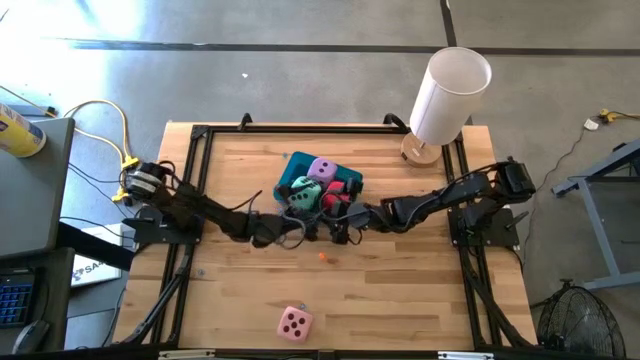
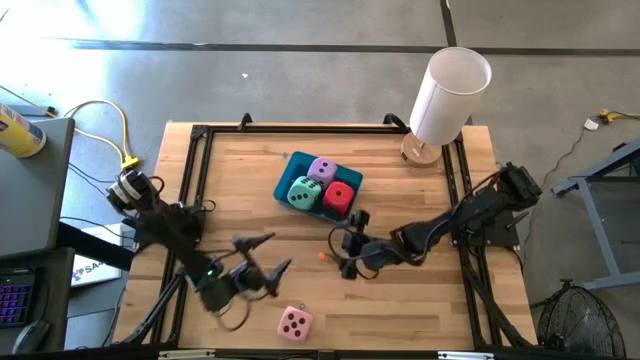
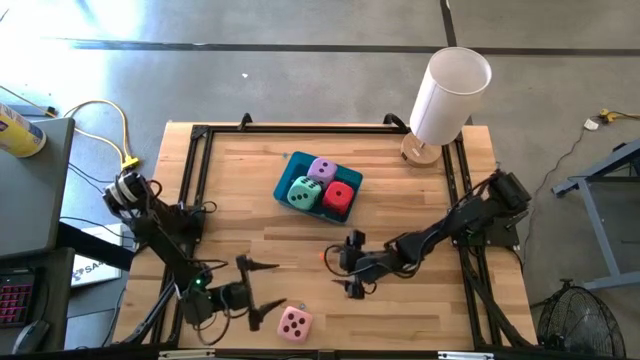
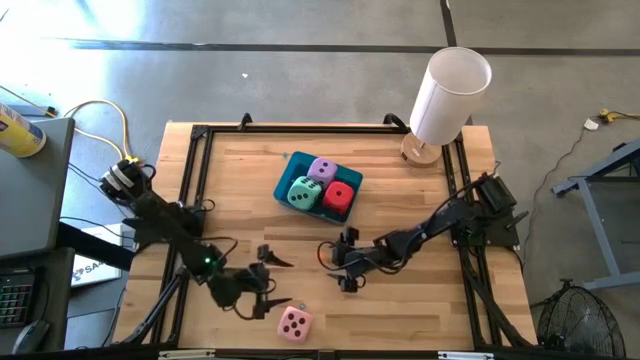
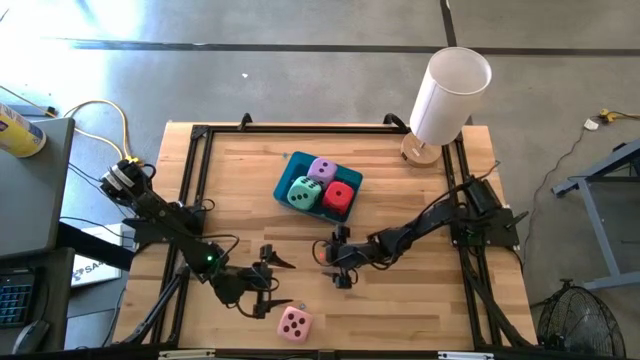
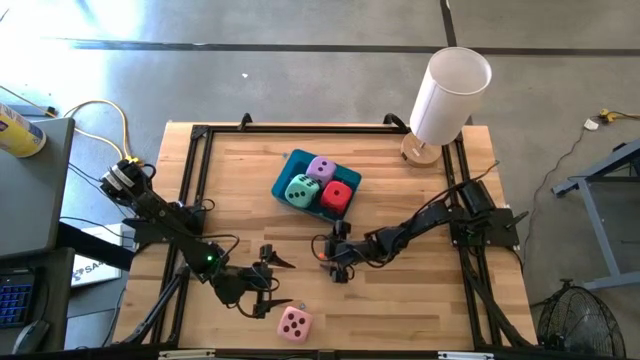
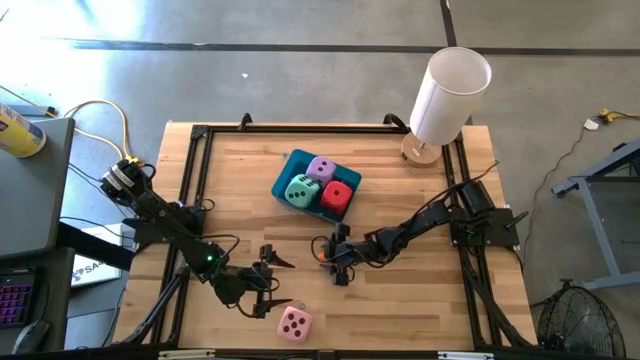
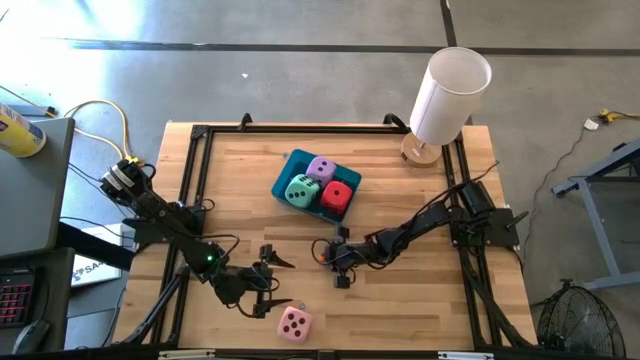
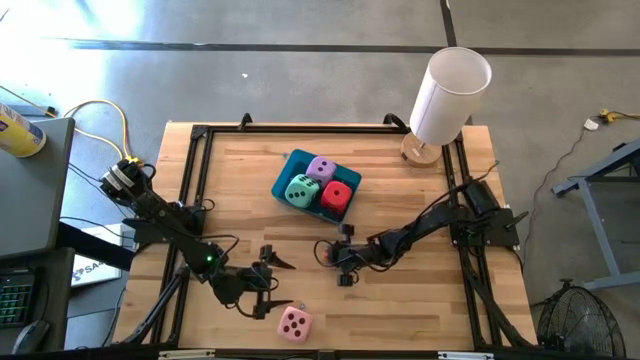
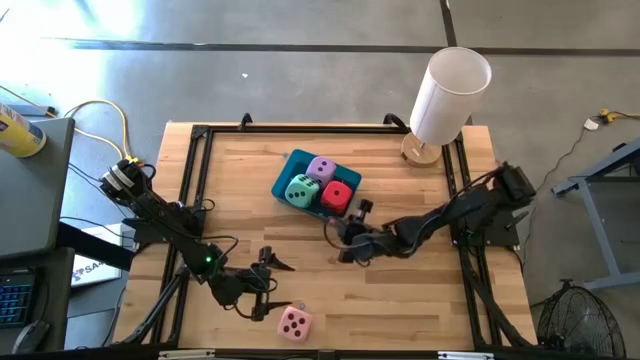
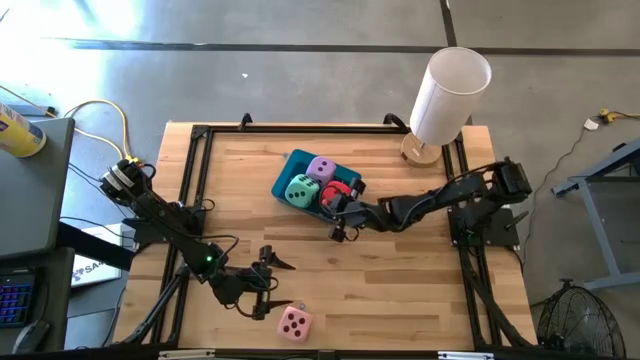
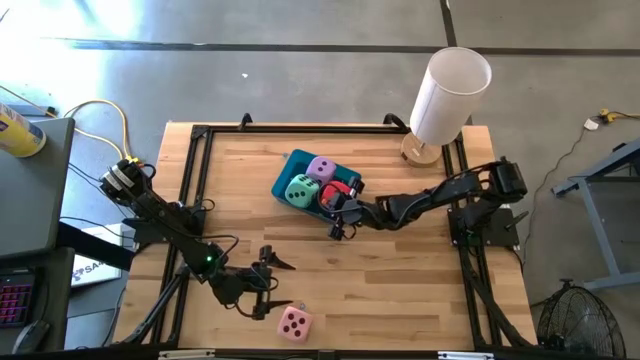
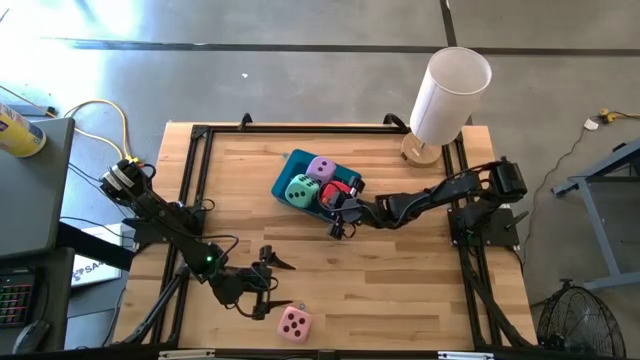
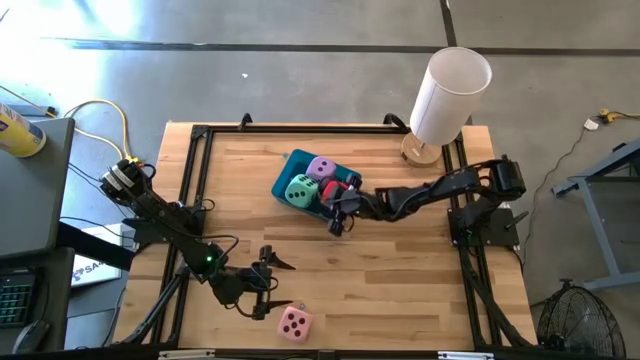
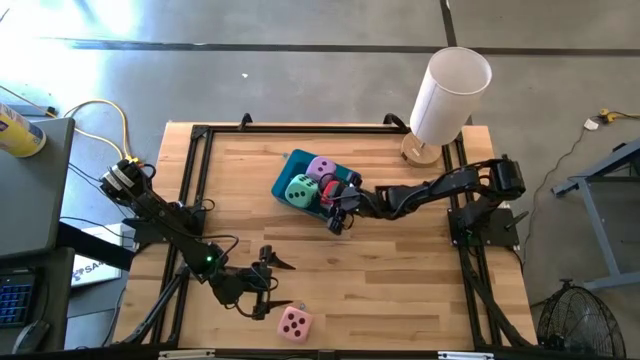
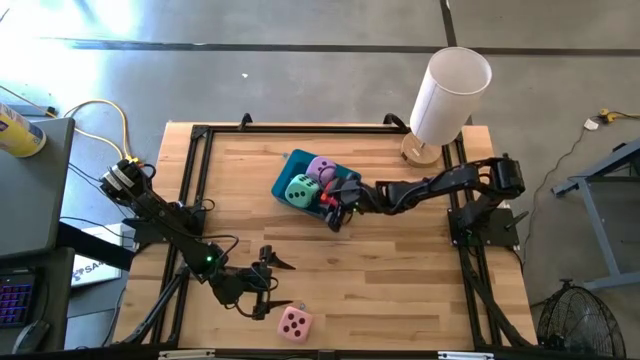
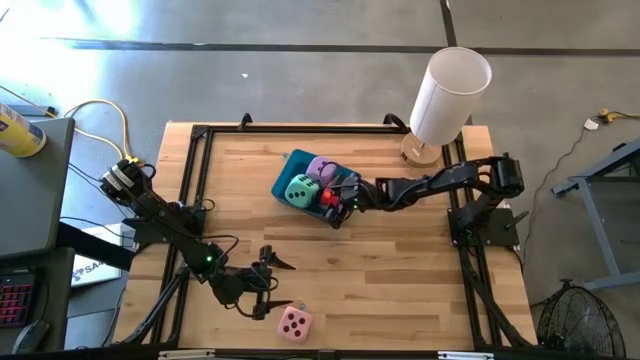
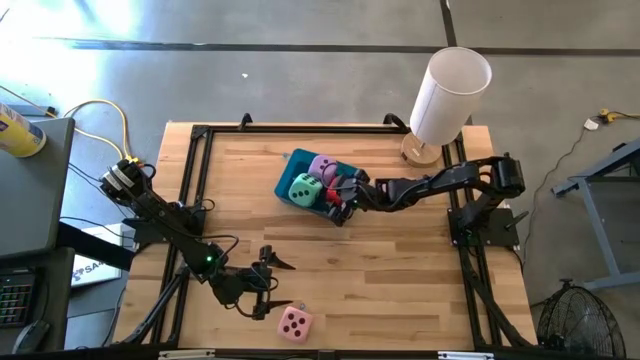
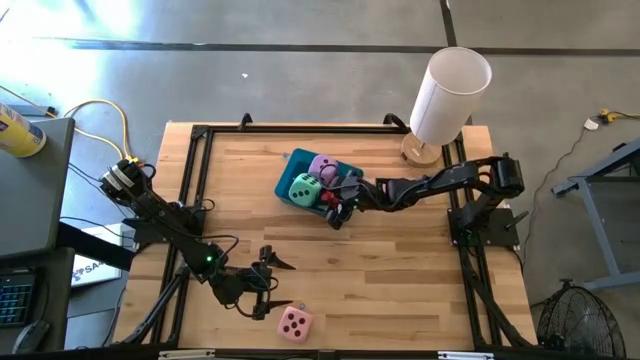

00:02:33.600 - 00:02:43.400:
Task: Pick & Place Dice
Put the small orange dice into the blue bin

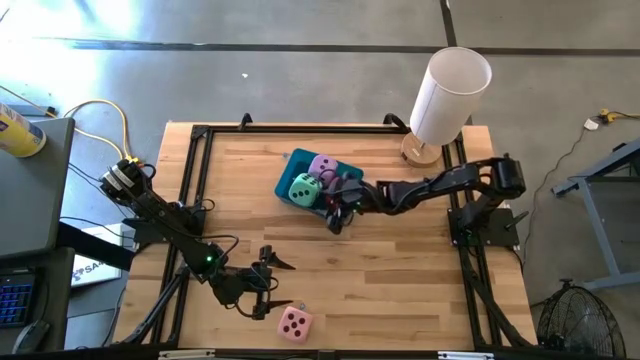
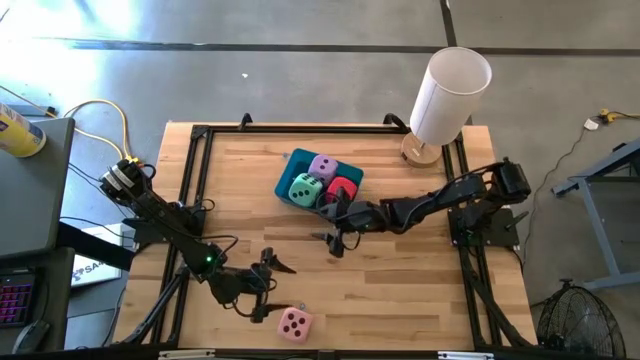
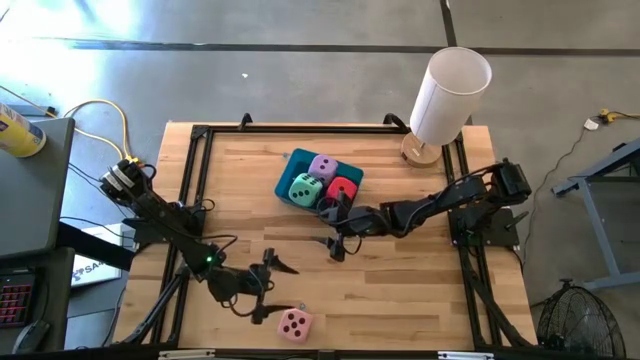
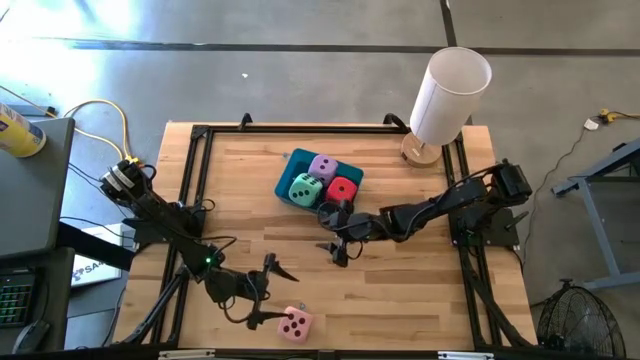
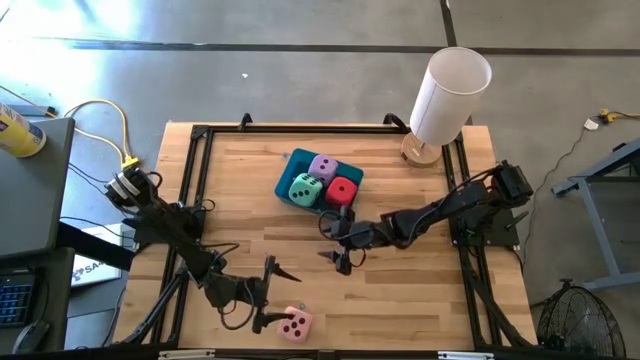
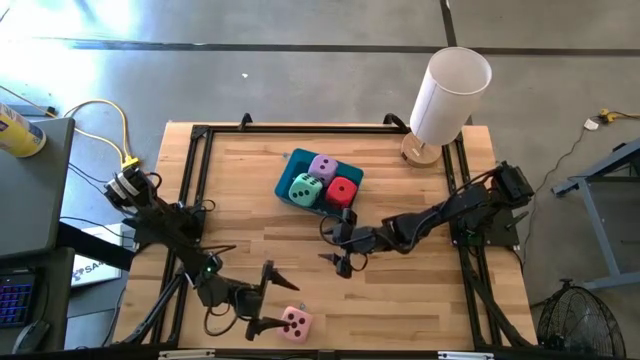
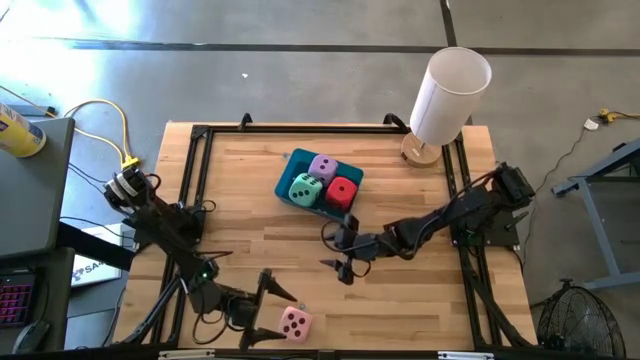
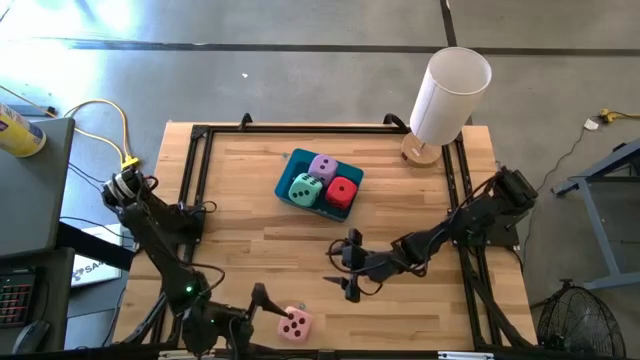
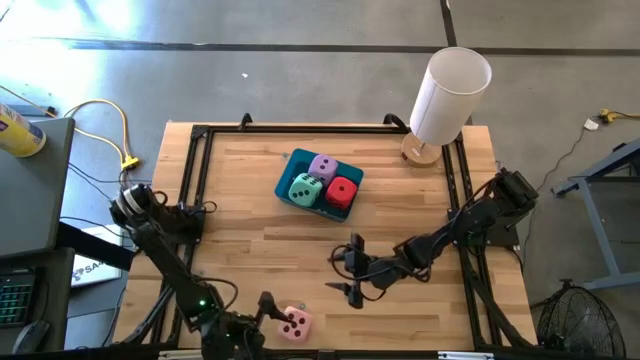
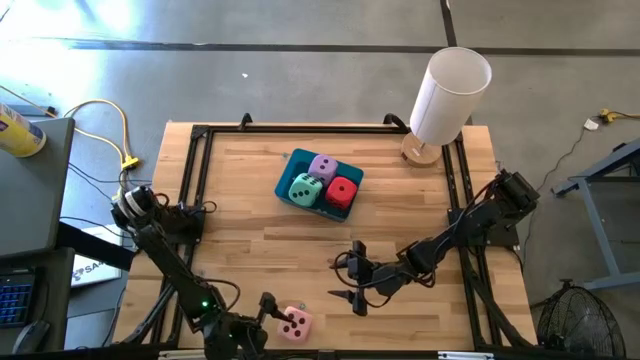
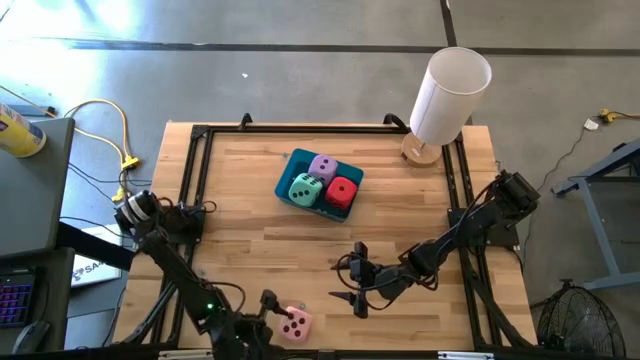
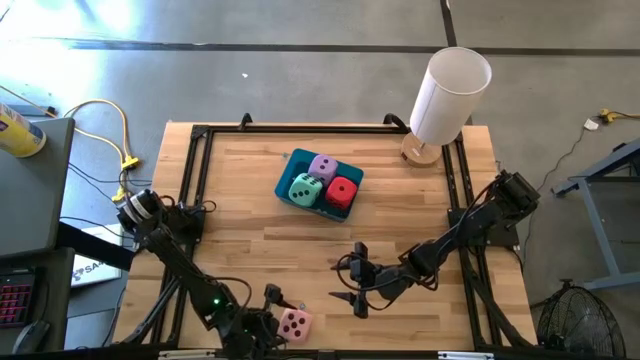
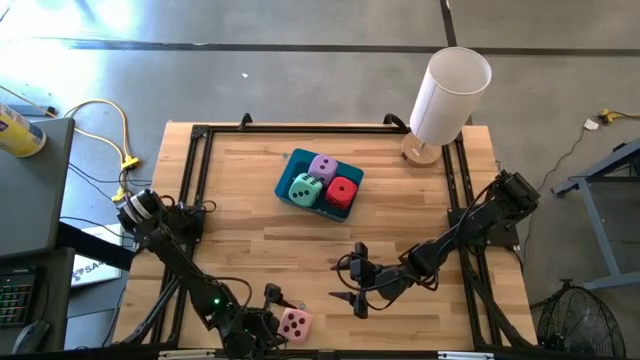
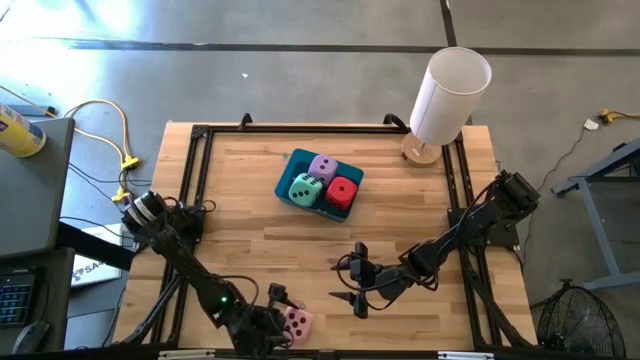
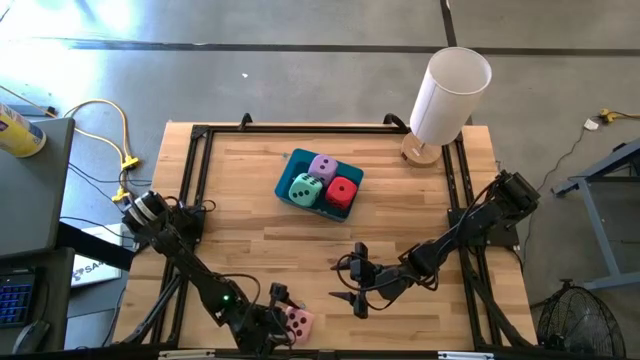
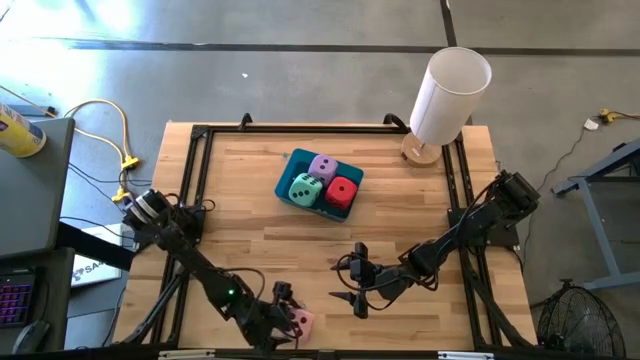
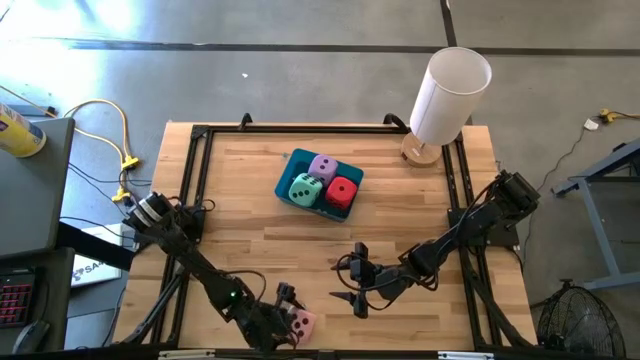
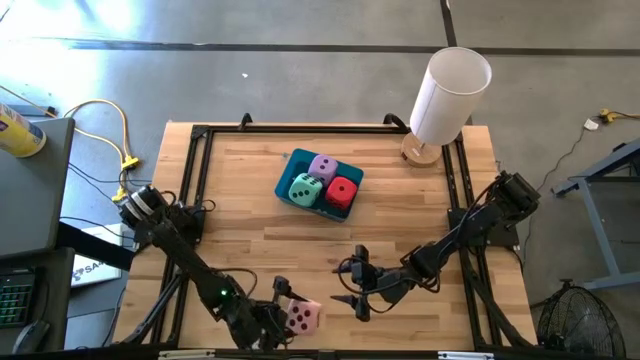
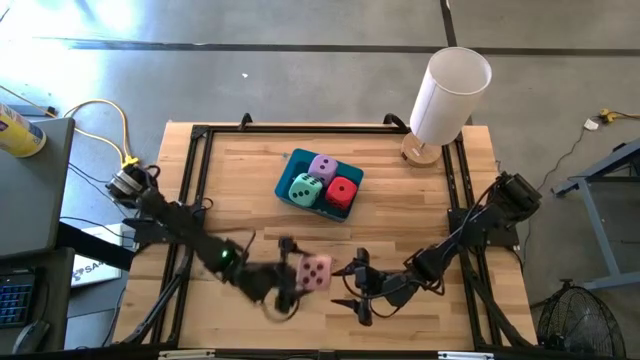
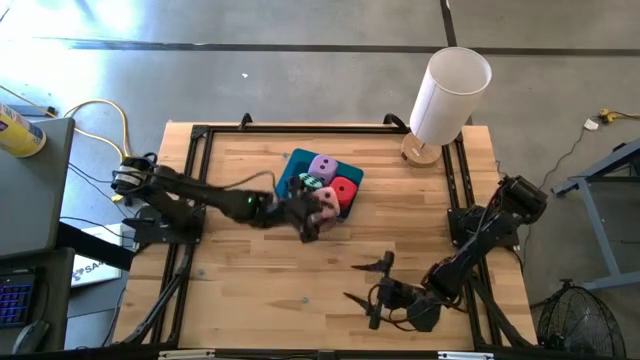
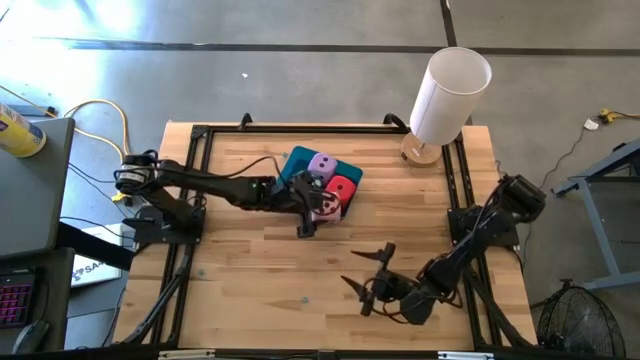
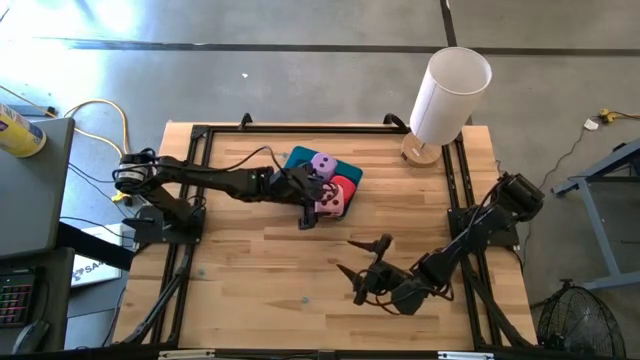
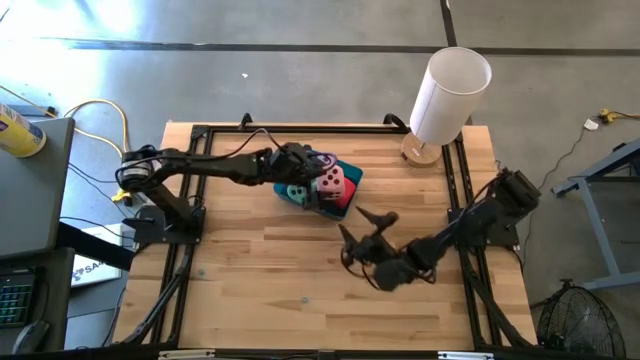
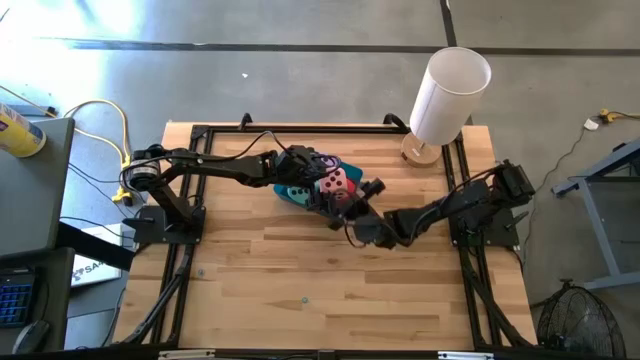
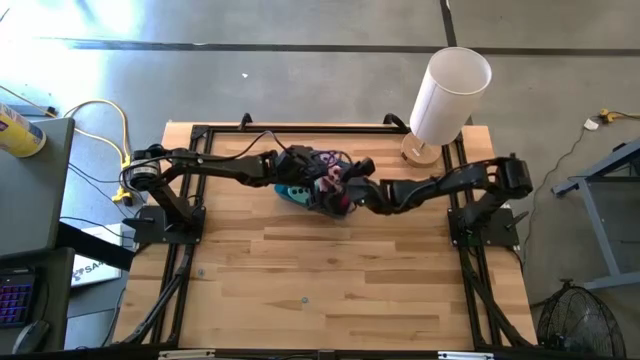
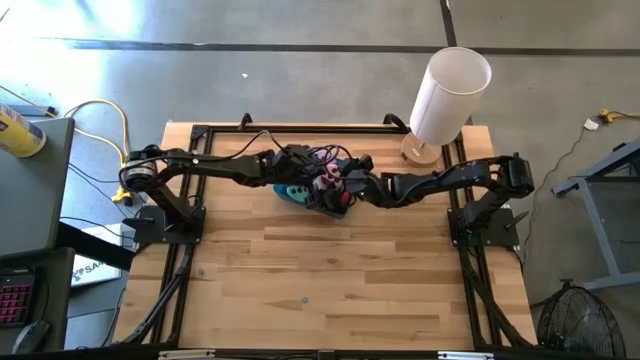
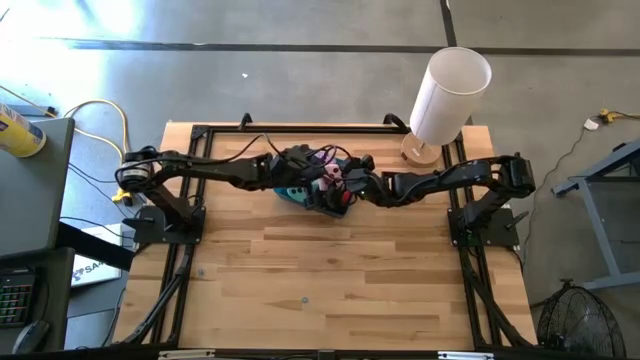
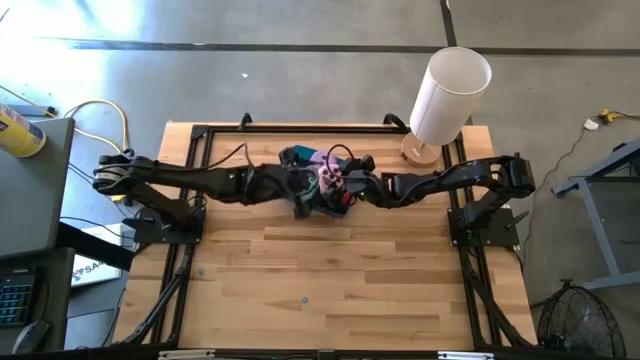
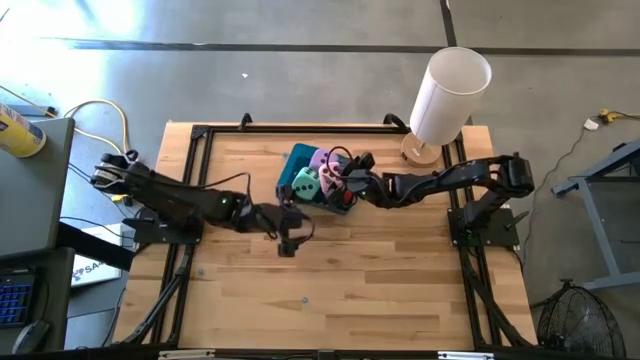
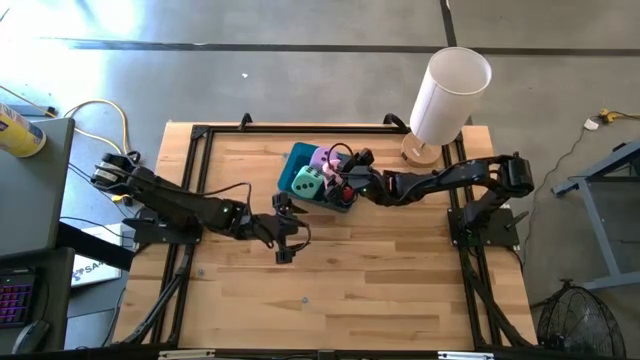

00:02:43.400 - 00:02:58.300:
Put the large pink dice into the blue bin
